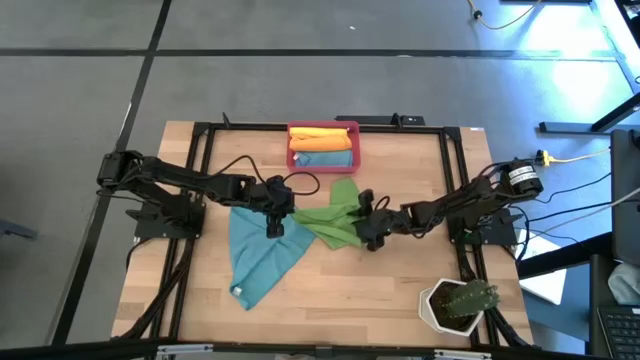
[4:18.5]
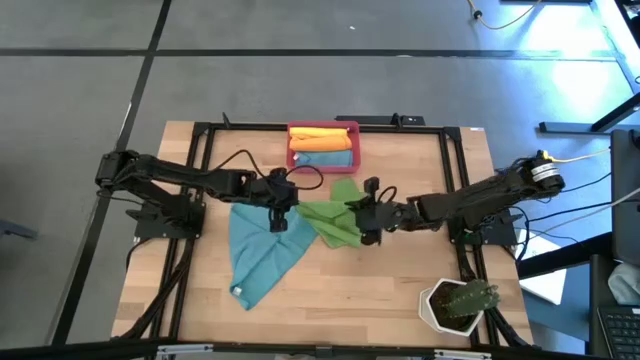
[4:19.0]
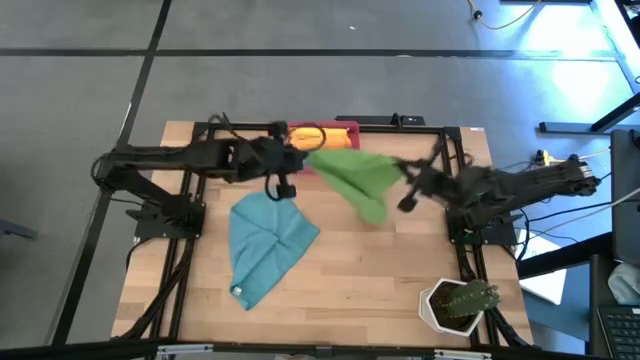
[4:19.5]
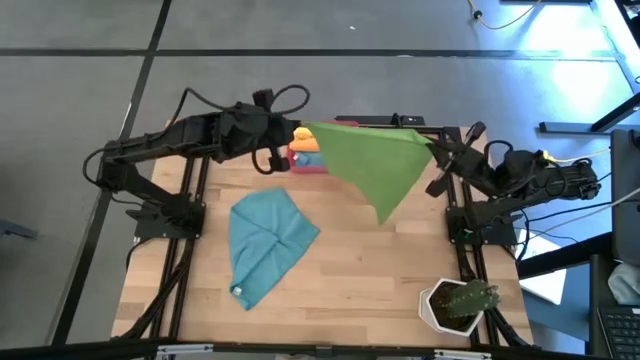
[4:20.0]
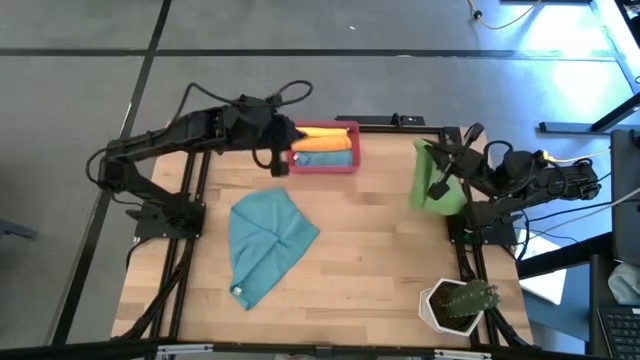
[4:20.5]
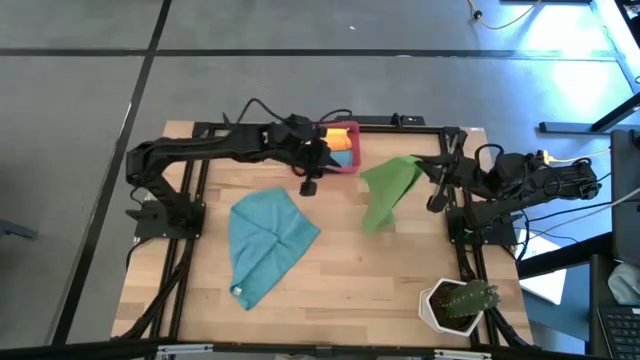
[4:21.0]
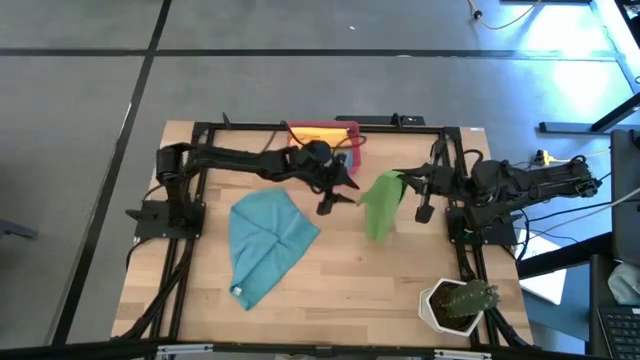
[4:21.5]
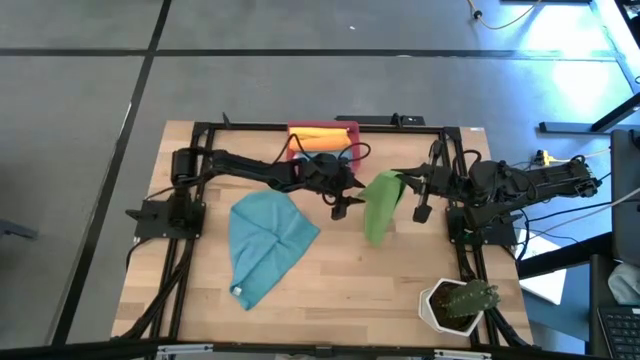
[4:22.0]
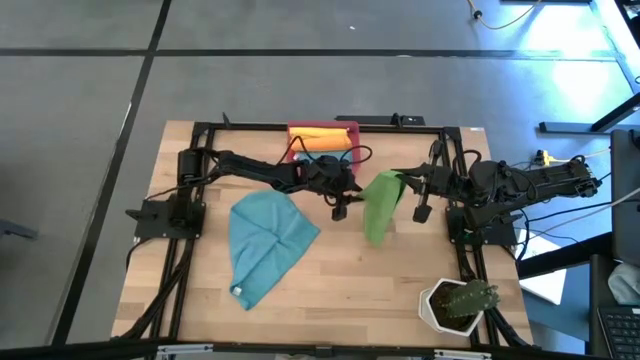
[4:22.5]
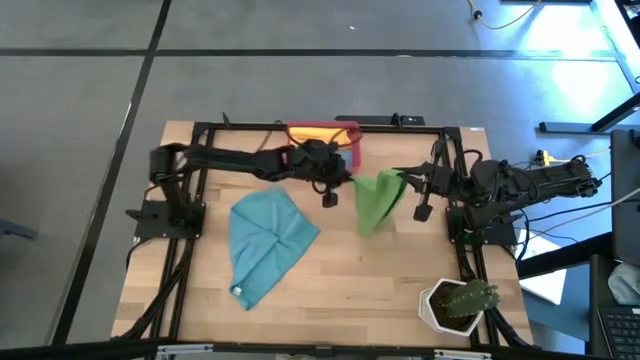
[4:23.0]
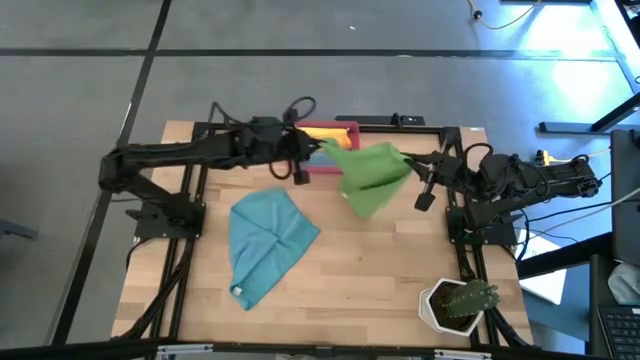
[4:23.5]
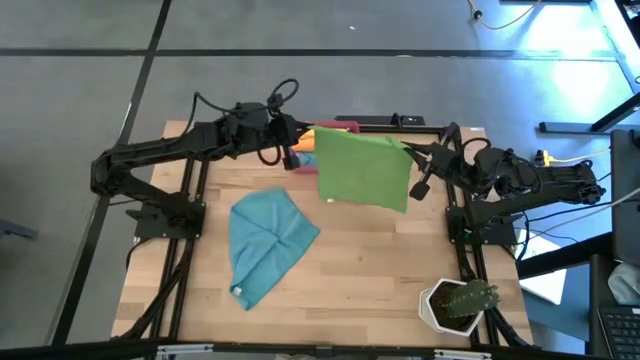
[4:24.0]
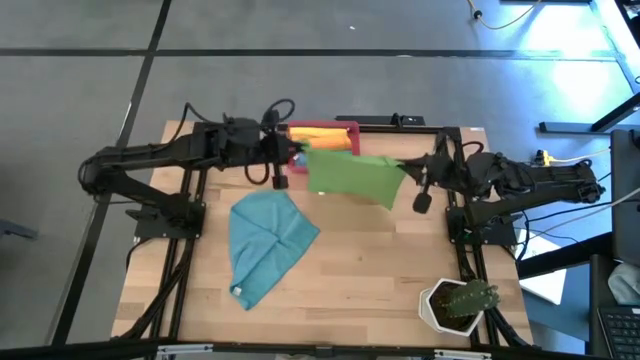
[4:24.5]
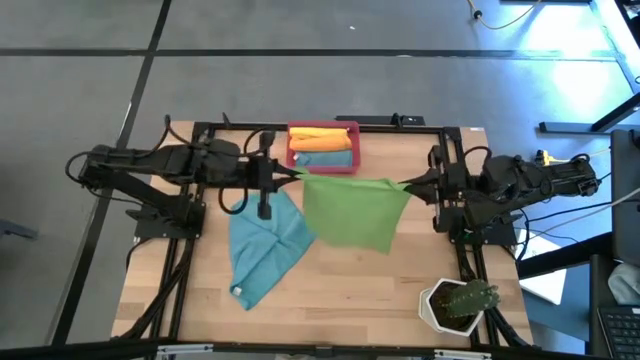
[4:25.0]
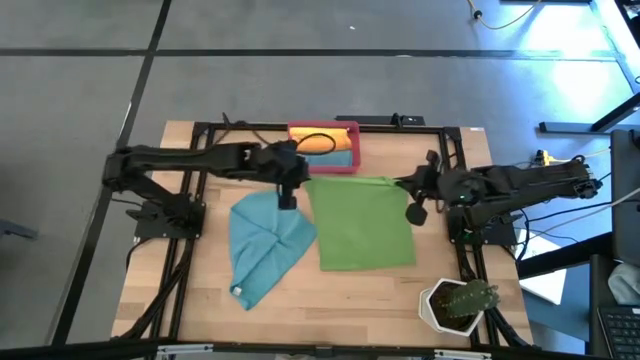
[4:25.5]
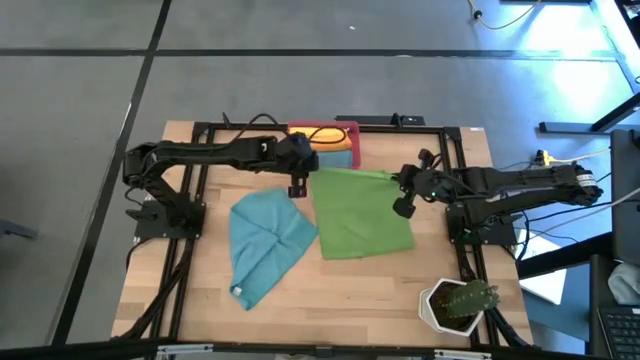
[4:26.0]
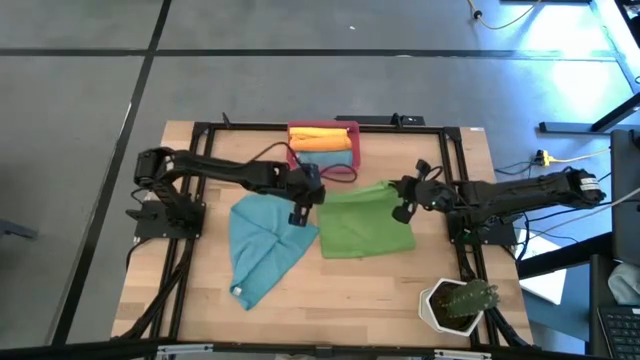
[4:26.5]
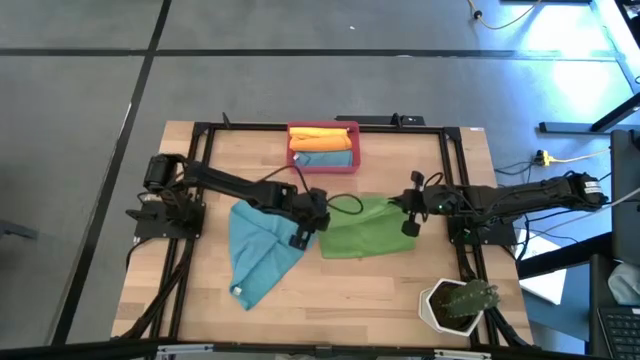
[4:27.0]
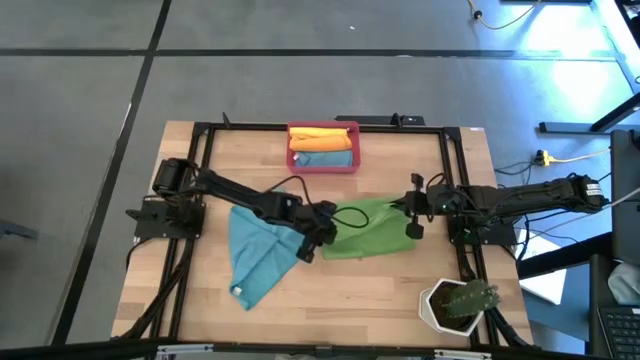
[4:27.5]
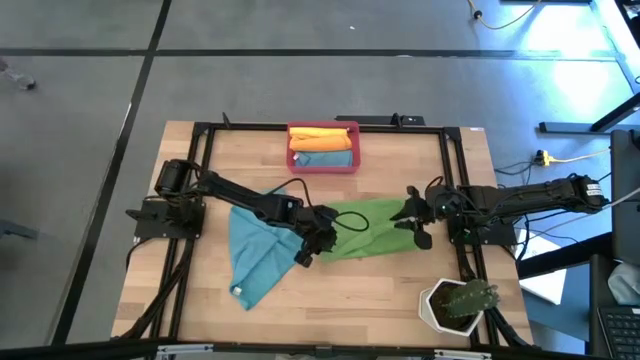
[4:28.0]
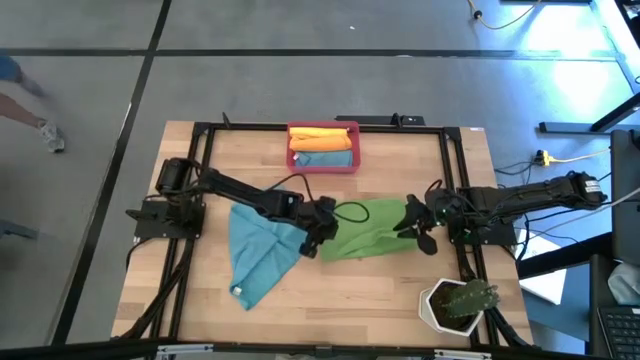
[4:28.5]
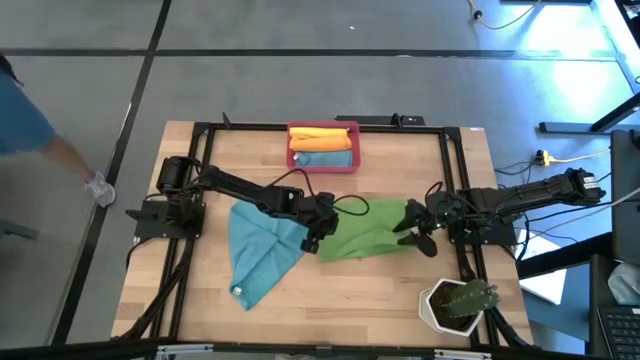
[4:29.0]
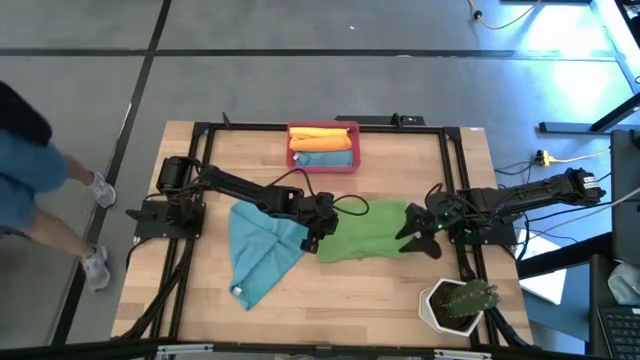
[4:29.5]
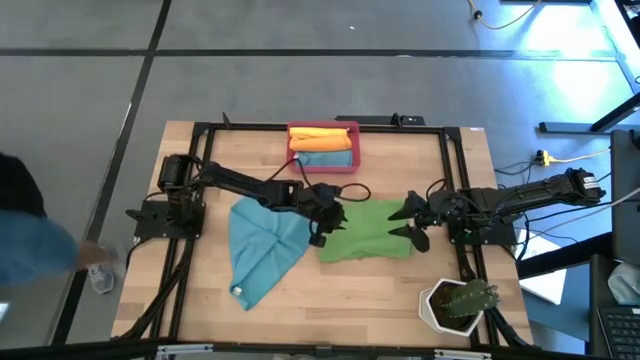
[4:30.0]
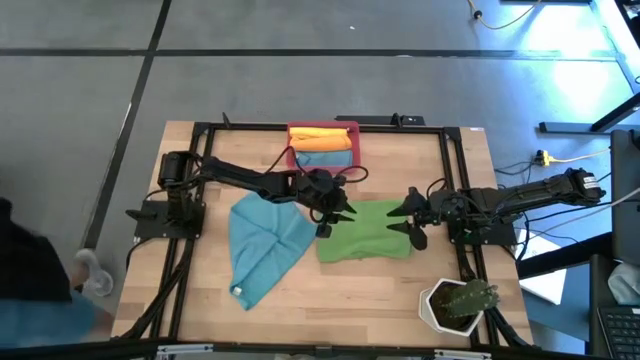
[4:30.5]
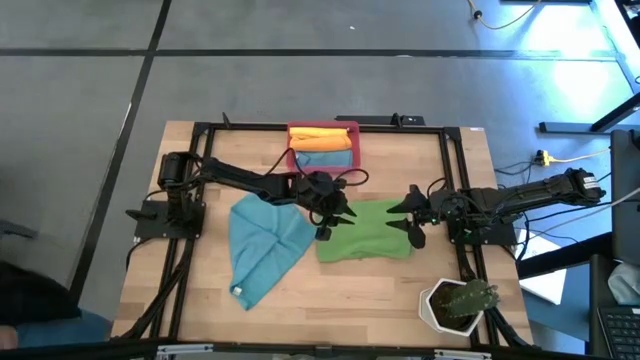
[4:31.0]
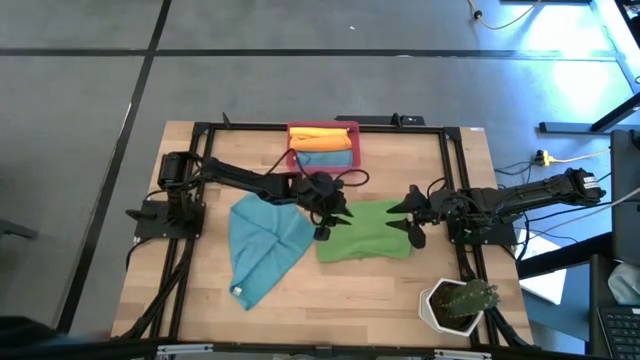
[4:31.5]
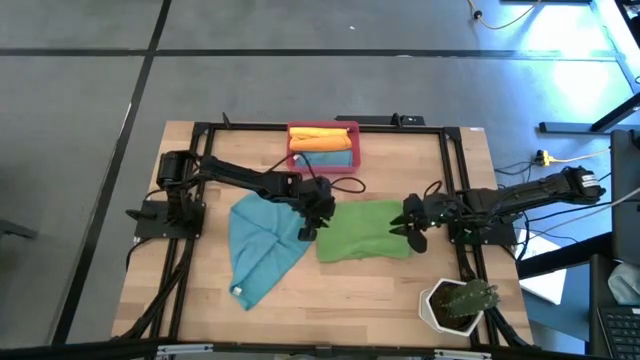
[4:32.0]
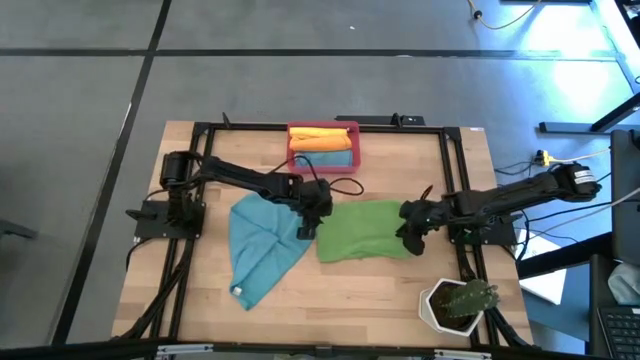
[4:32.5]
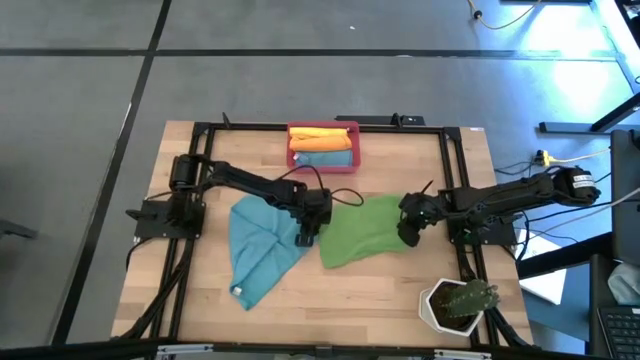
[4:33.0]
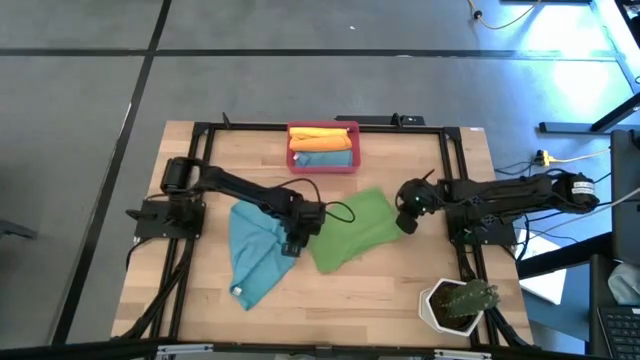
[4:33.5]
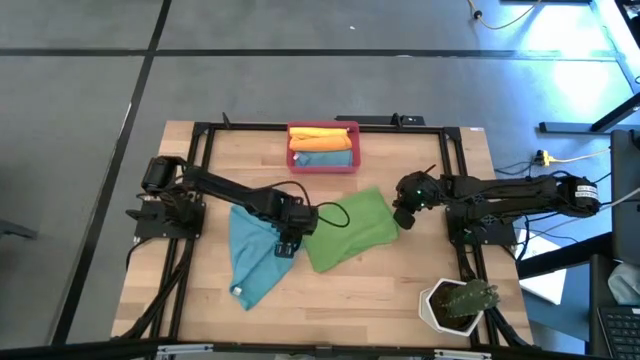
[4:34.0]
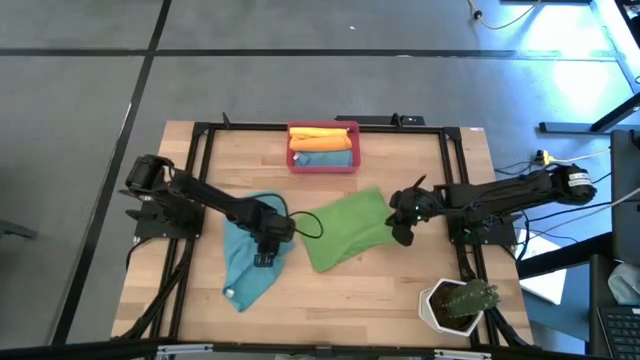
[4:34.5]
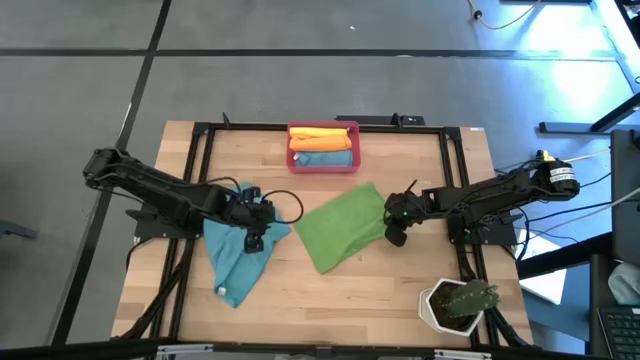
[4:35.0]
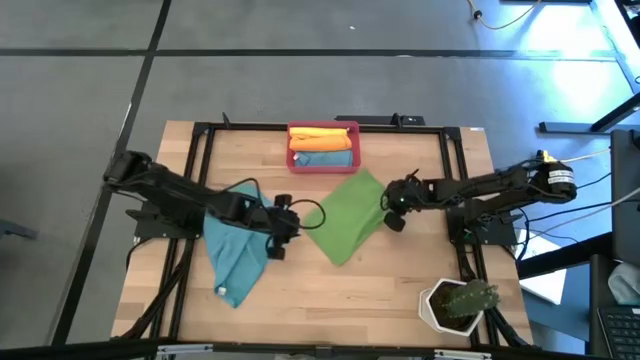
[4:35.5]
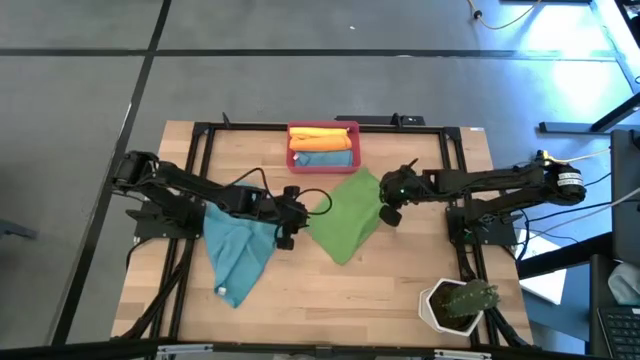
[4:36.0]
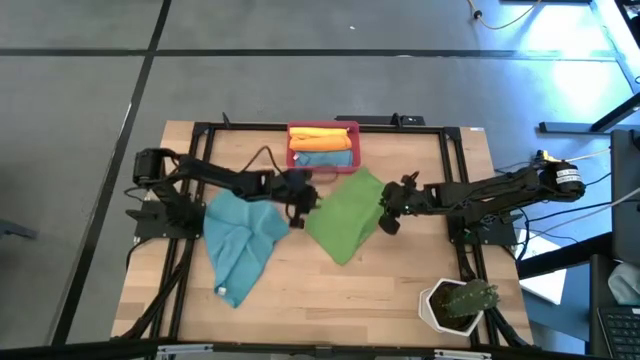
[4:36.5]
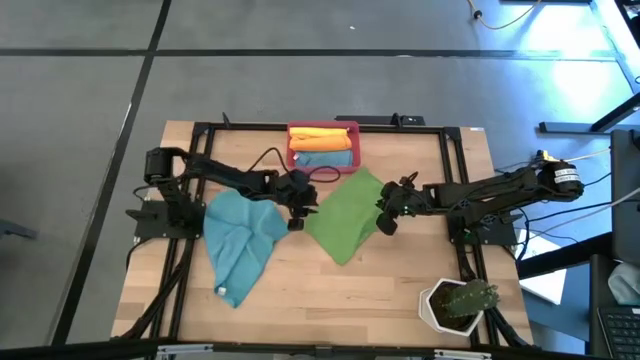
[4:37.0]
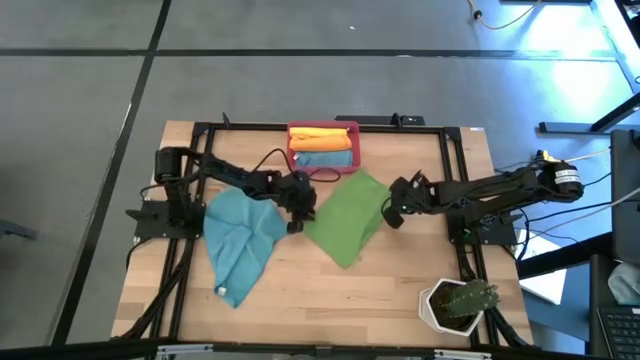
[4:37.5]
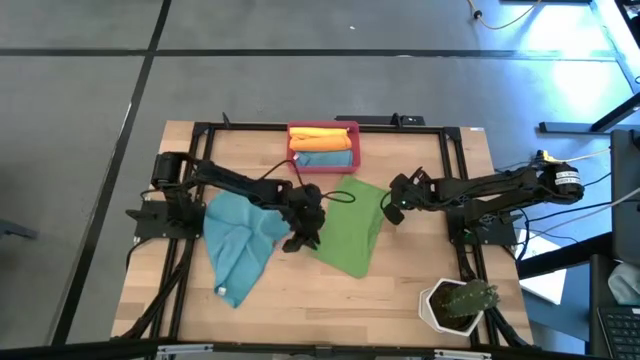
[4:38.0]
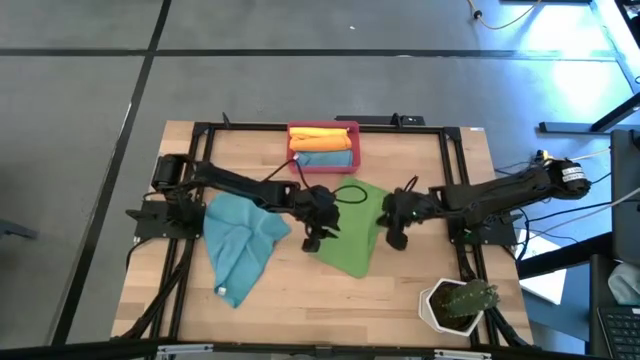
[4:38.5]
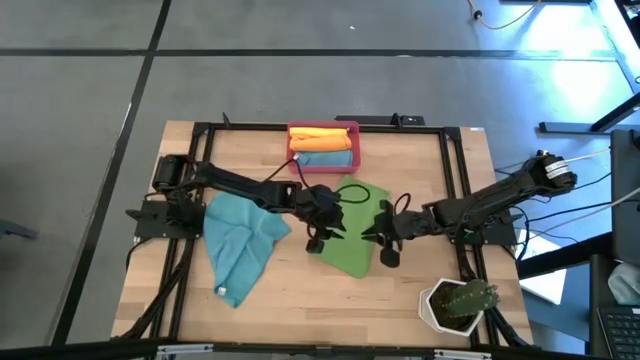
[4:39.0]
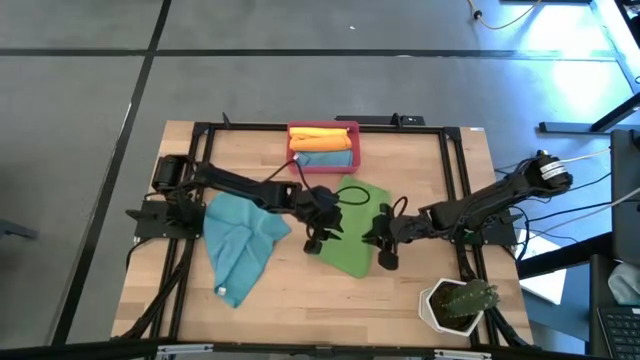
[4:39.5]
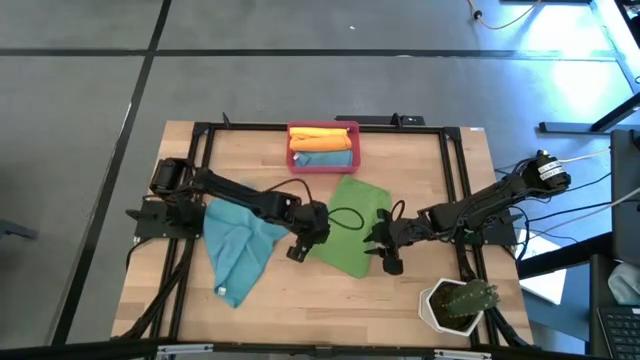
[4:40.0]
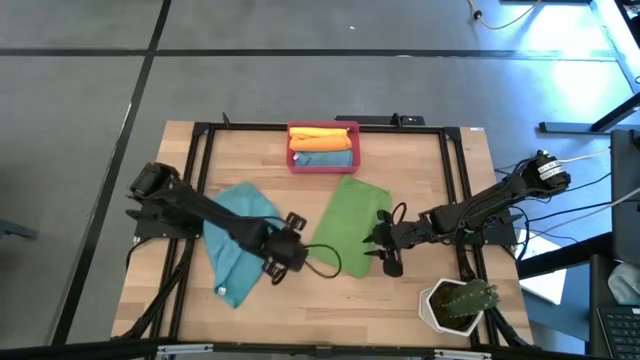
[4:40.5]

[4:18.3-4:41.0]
Task: Roll microfiber towels into tight, uniform cylinder then place into a basket
Fold the green microfiber towel
